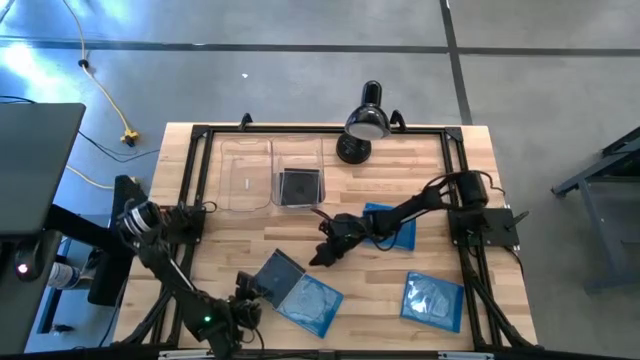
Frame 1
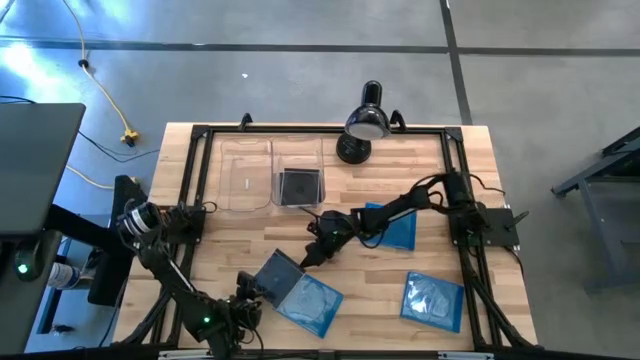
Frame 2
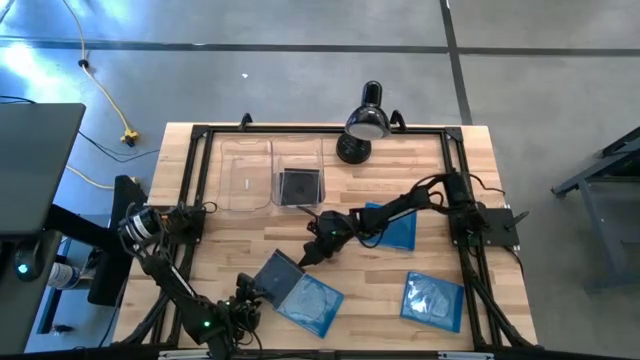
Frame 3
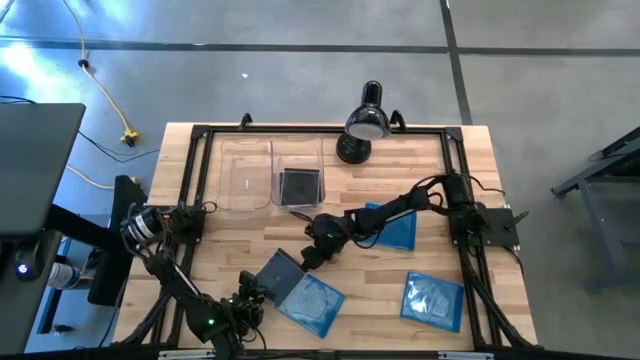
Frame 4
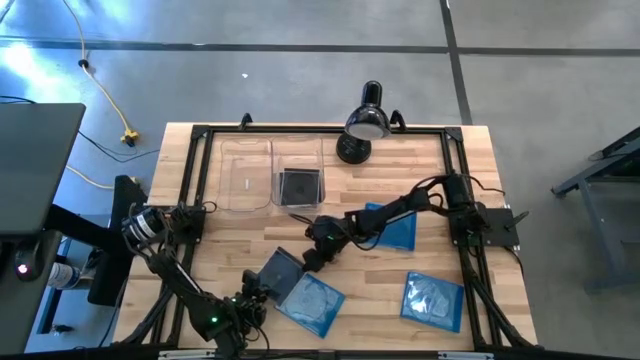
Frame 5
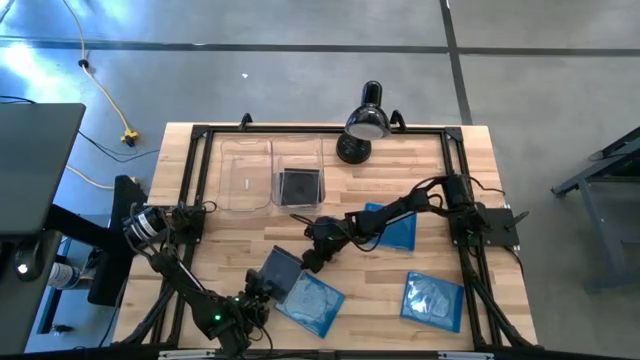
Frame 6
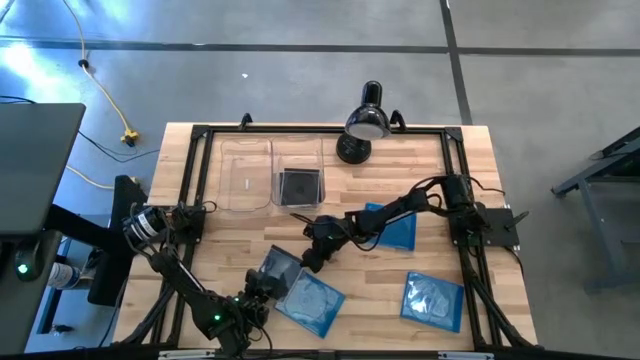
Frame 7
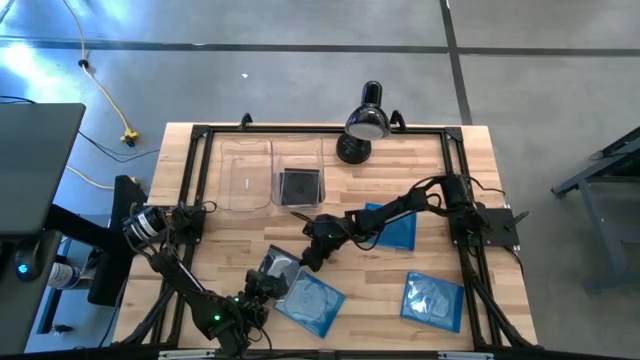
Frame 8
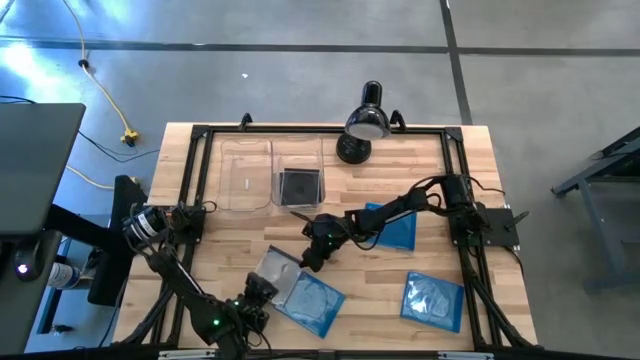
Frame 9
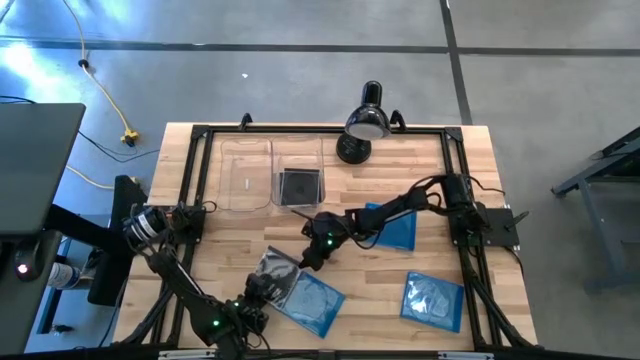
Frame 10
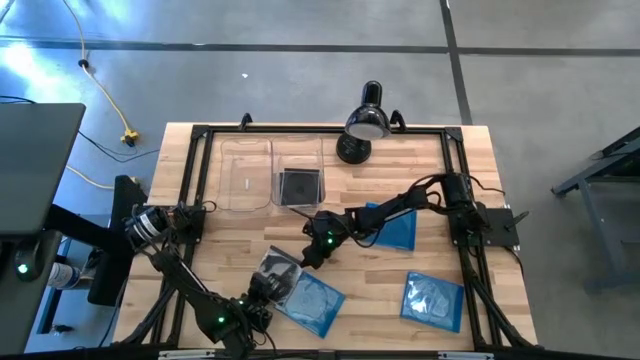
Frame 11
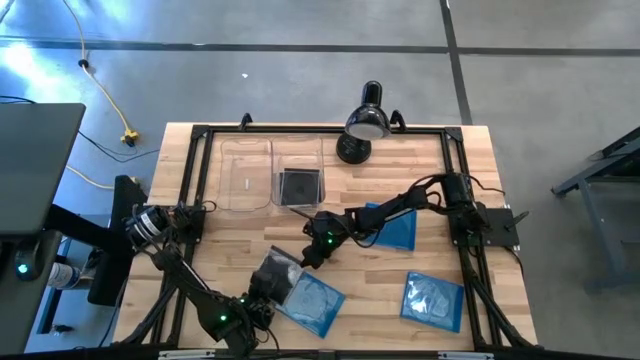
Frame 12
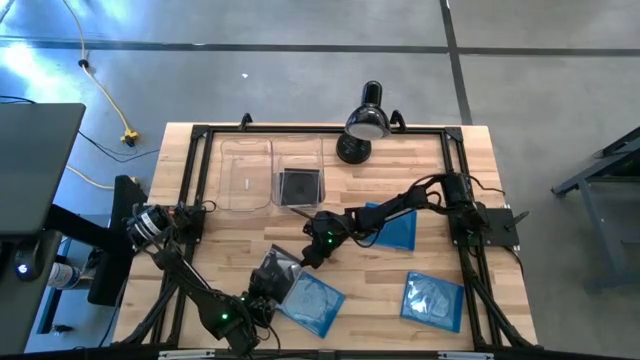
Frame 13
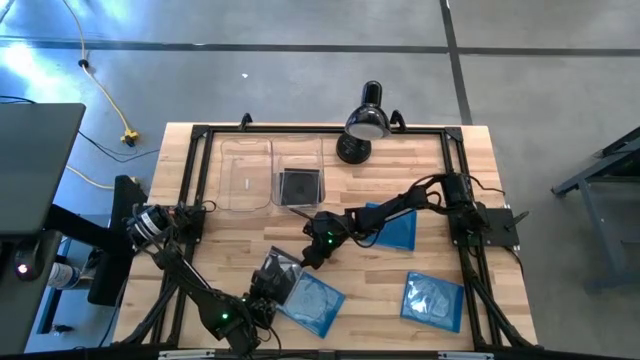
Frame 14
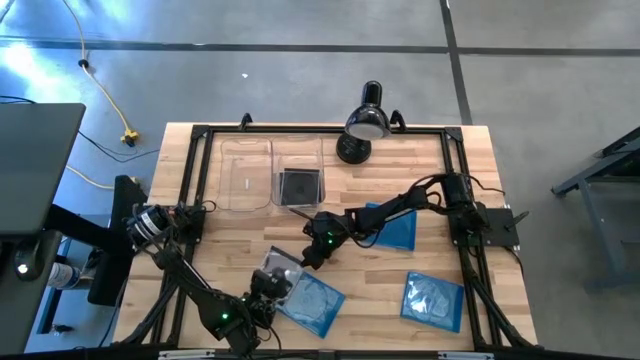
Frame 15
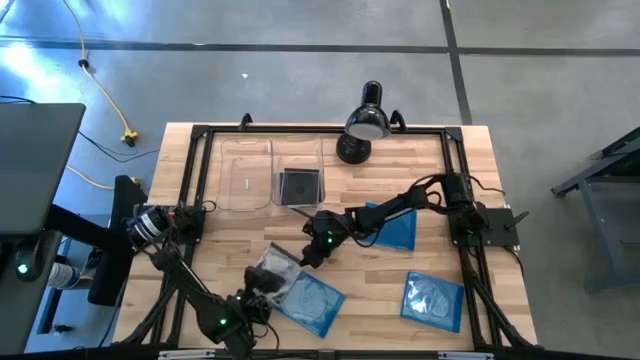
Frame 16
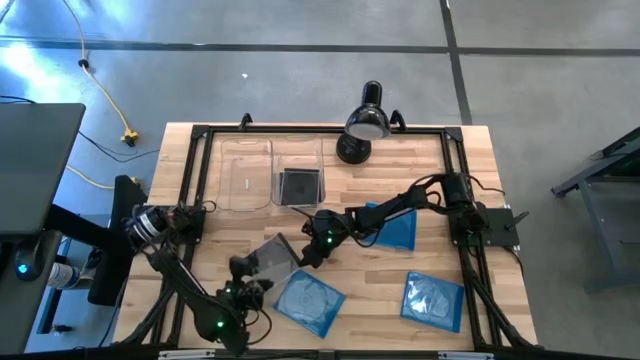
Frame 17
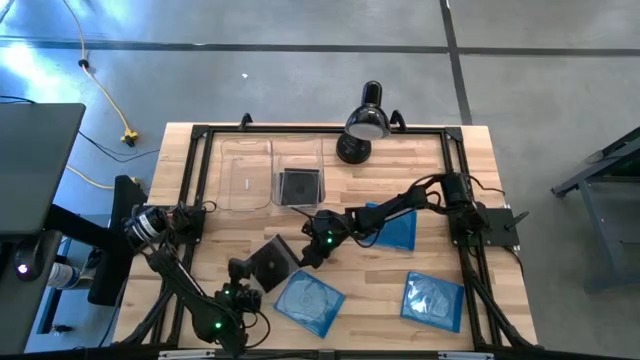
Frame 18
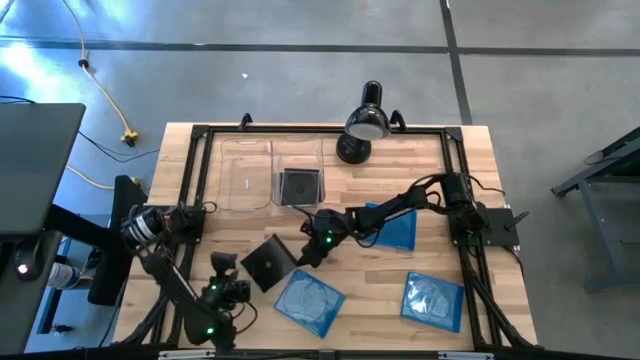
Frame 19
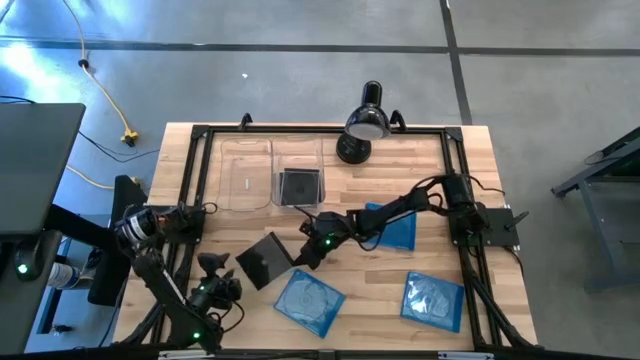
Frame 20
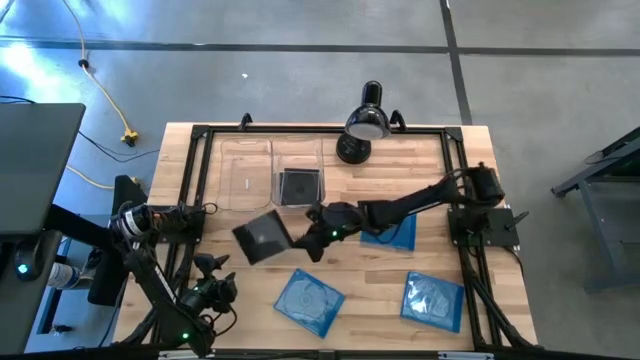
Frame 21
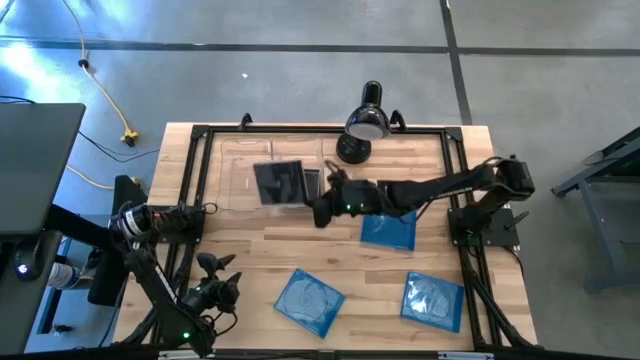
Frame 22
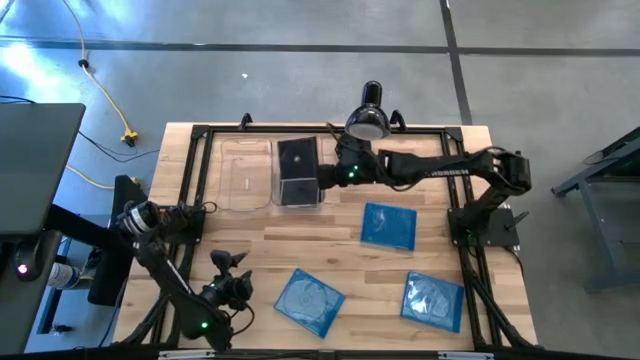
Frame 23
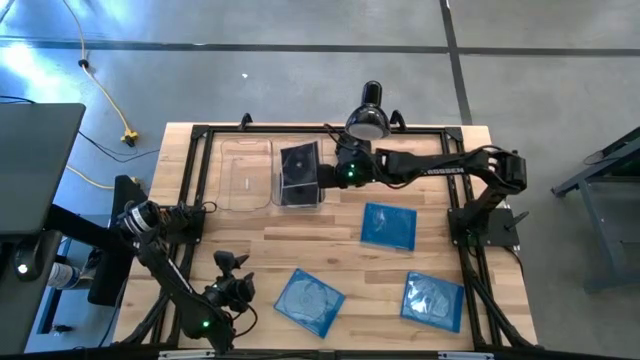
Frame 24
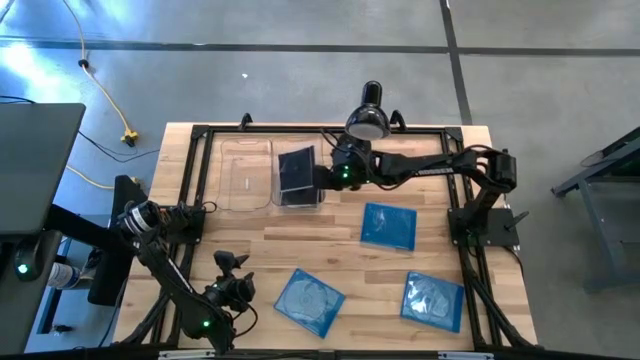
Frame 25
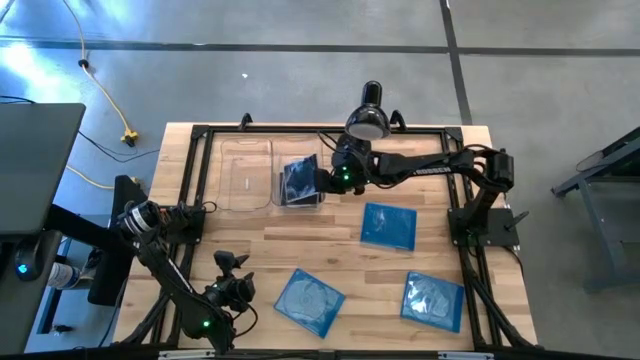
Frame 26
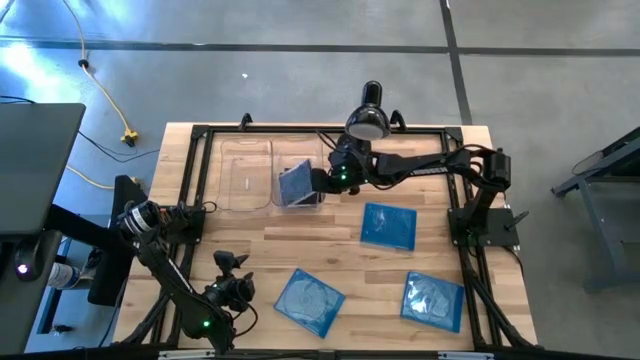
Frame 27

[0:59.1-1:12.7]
Task: Pick & place jewel cases by type
Put the black CD case into the right transparent bin

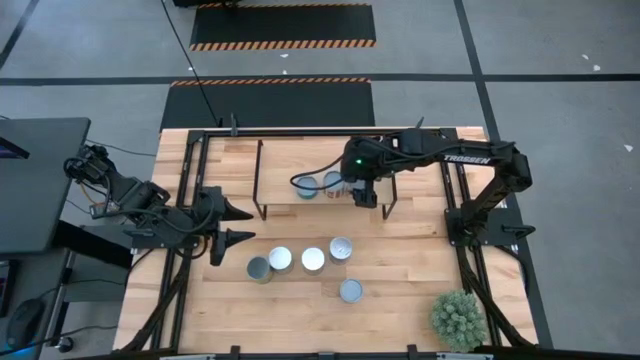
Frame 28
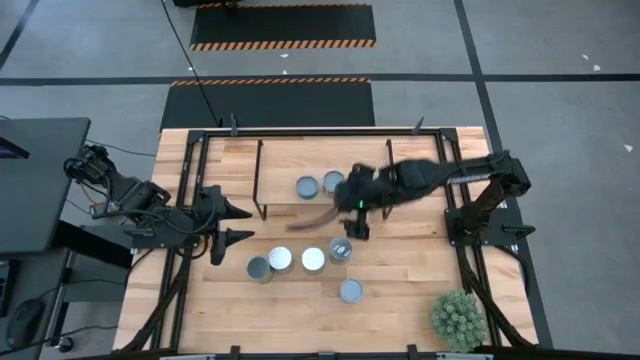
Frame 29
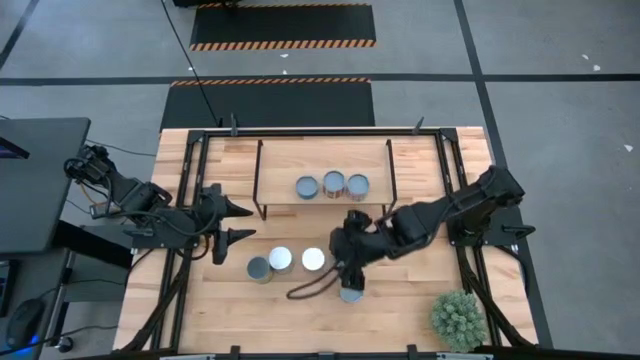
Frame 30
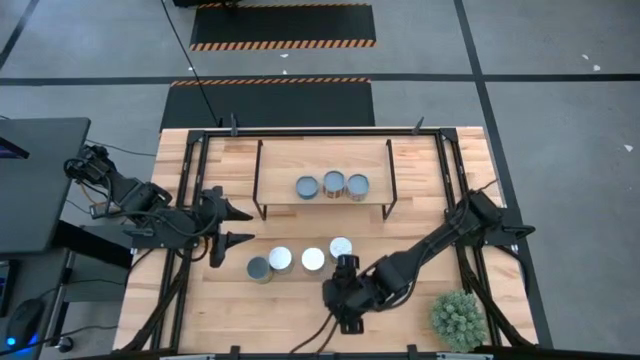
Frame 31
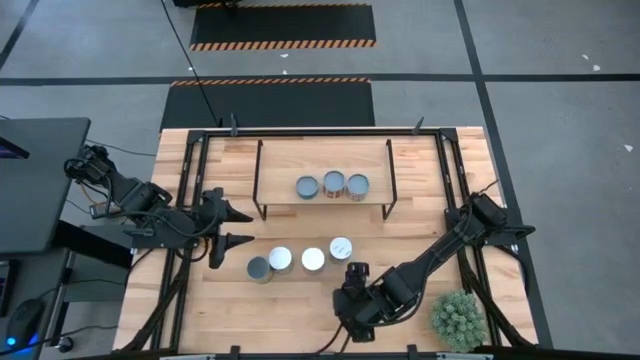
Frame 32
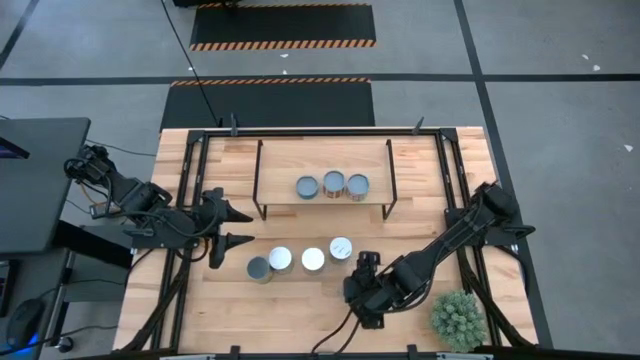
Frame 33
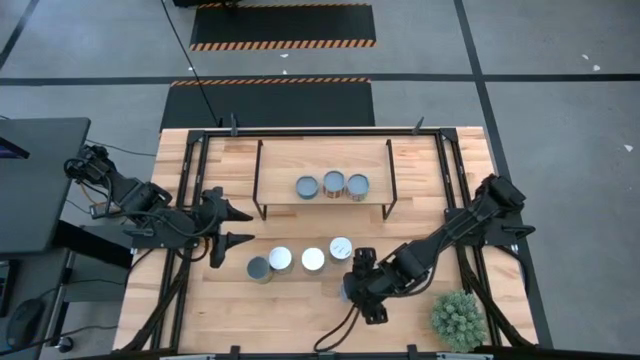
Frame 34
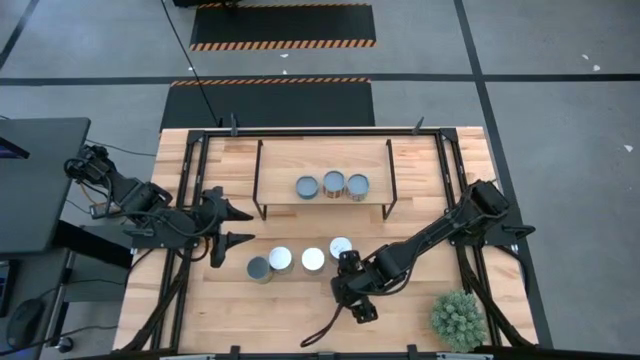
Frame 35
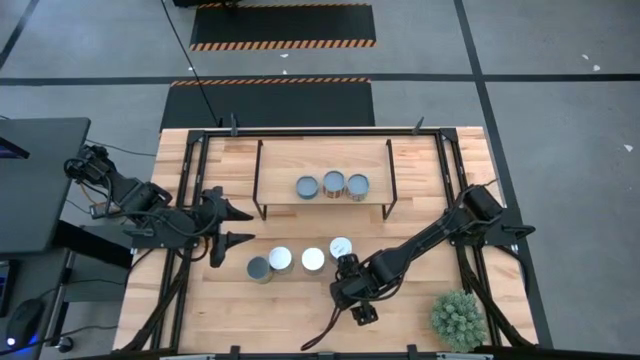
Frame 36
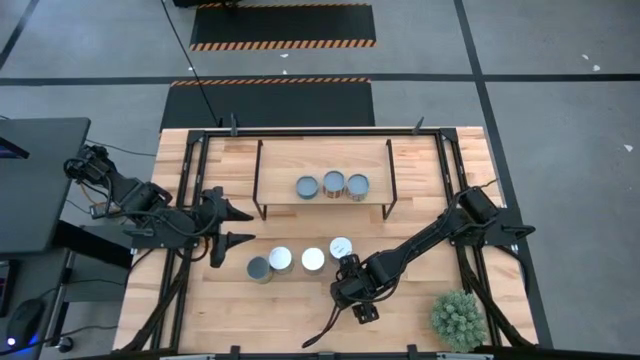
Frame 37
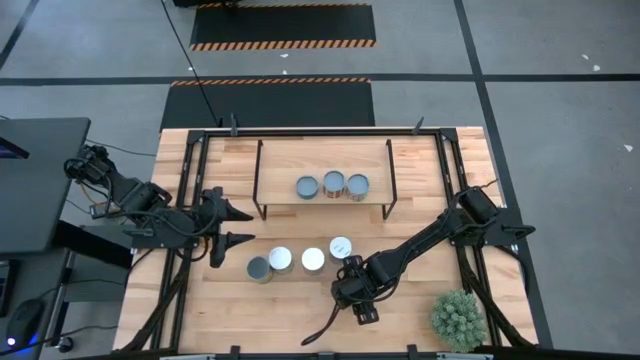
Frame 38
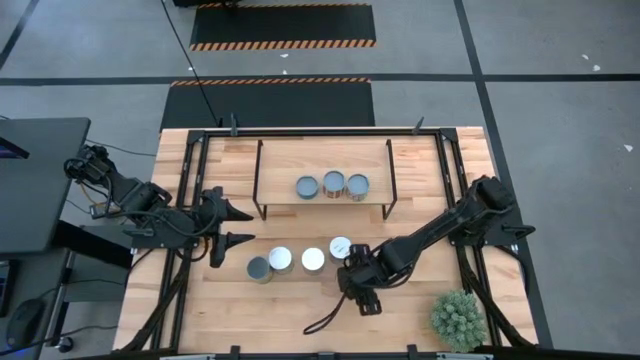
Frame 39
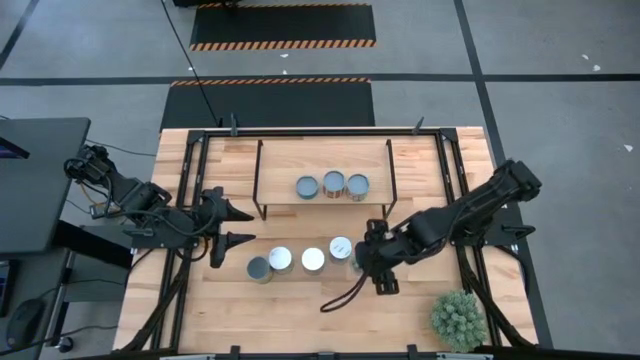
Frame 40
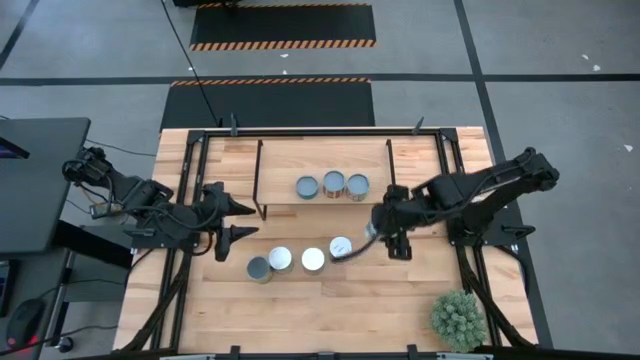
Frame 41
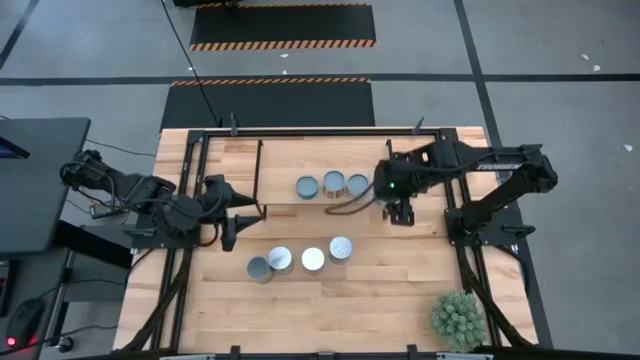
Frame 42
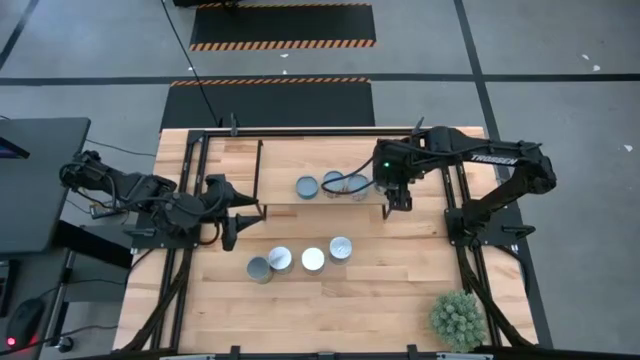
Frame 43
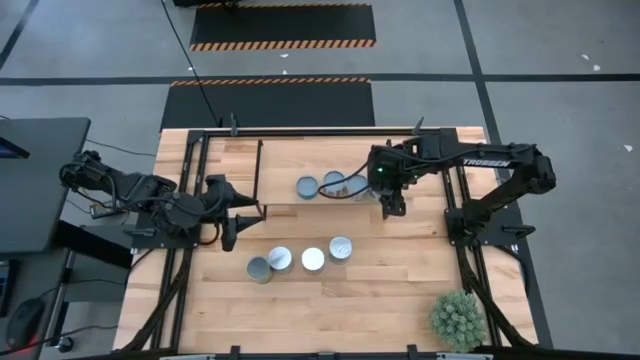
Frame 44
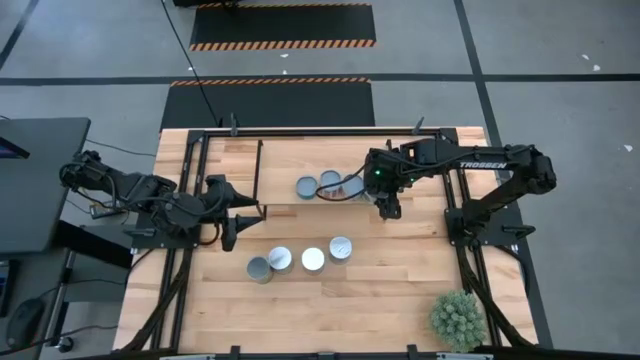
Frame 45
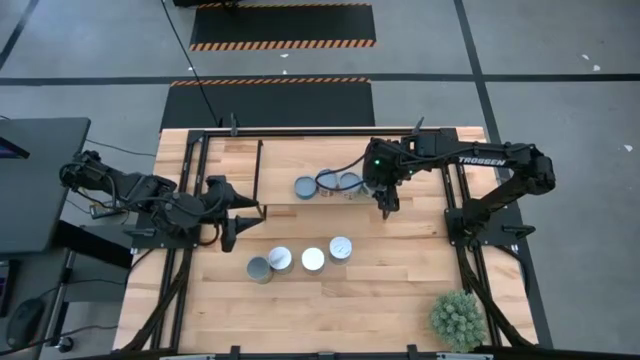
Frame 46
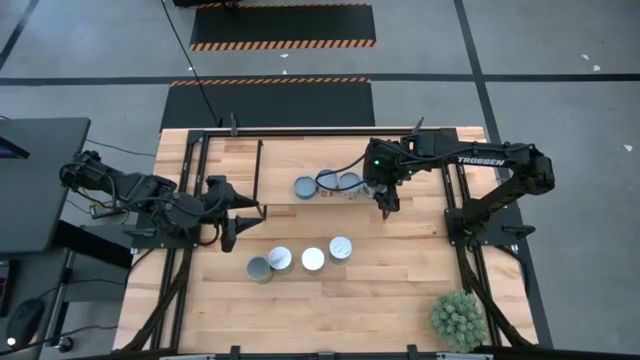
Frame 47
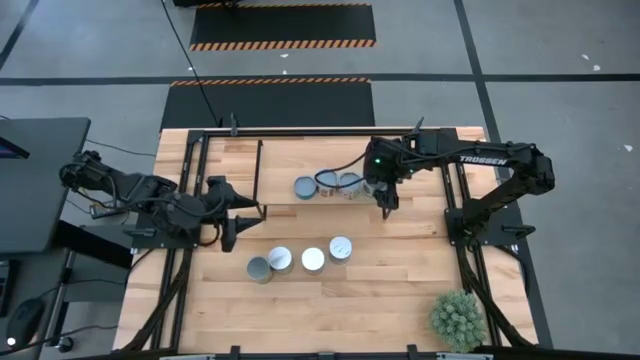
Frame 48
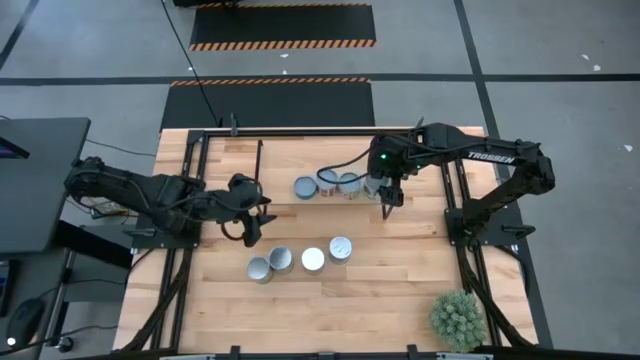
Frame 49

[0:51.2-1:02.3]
Task: Pick and place cans onto a shelf
Put the canned mixed vegetables on the shelf
